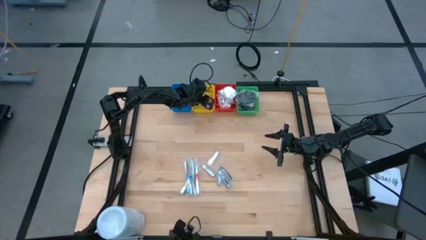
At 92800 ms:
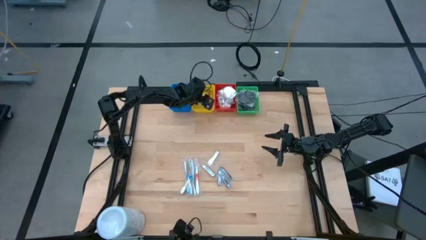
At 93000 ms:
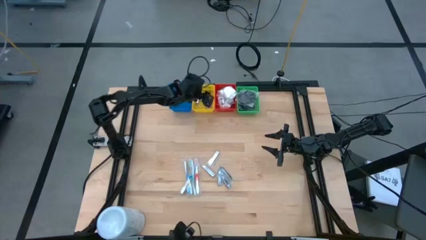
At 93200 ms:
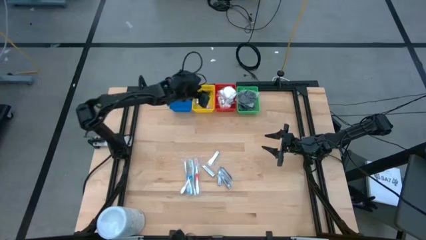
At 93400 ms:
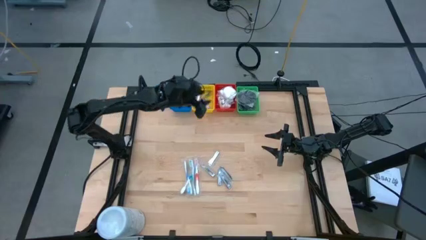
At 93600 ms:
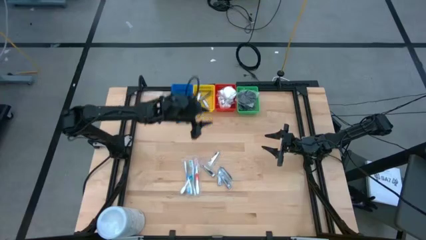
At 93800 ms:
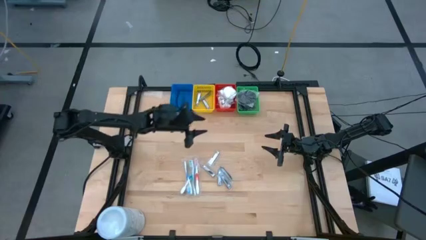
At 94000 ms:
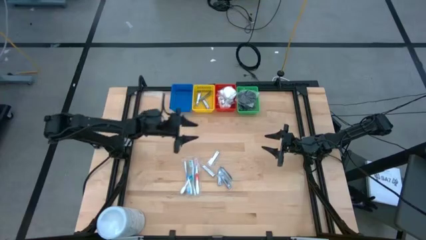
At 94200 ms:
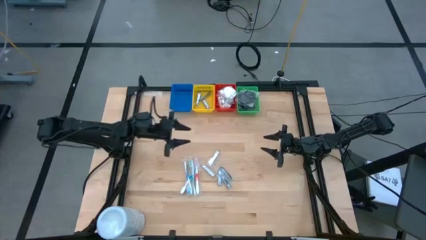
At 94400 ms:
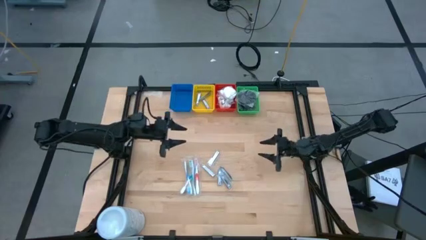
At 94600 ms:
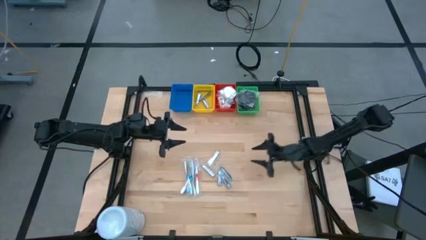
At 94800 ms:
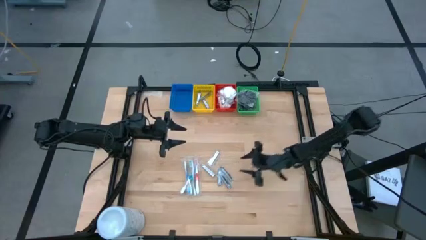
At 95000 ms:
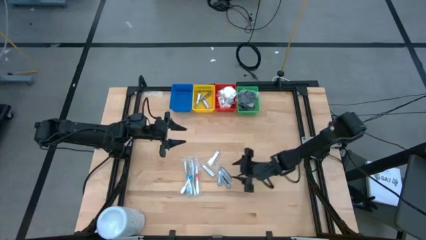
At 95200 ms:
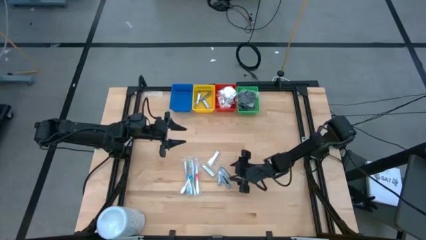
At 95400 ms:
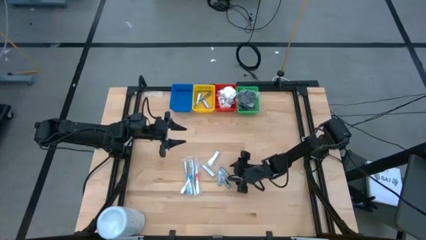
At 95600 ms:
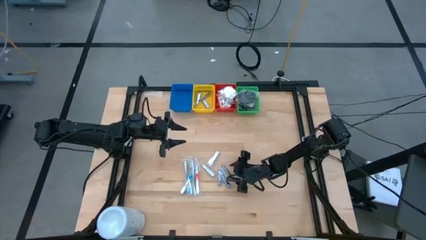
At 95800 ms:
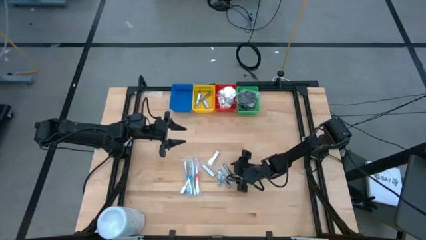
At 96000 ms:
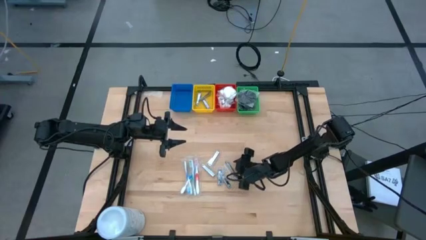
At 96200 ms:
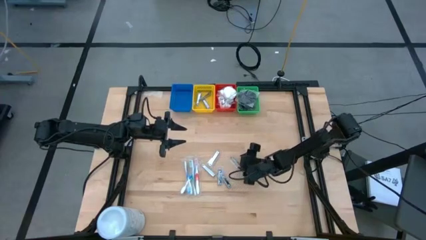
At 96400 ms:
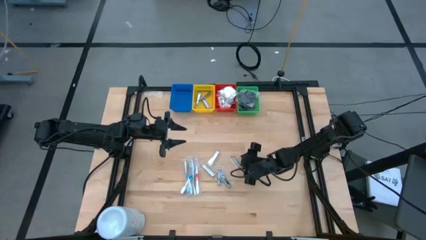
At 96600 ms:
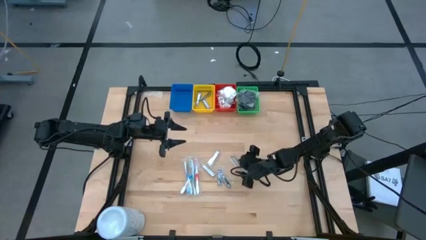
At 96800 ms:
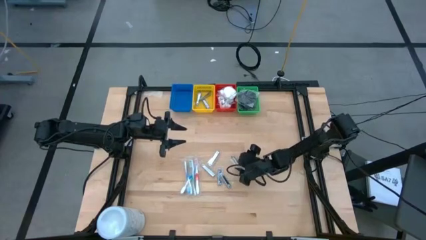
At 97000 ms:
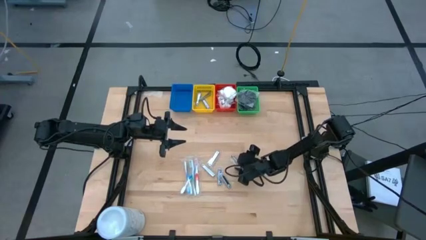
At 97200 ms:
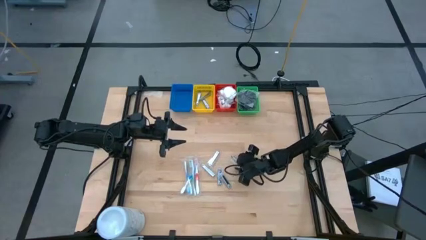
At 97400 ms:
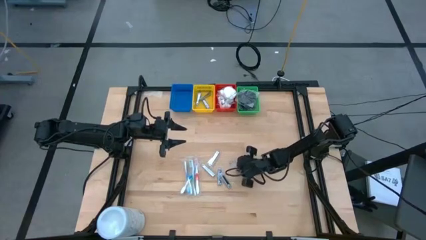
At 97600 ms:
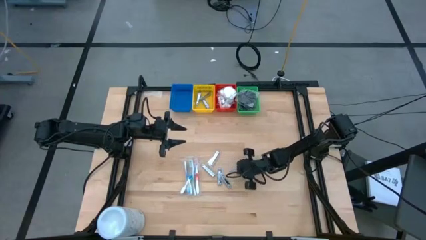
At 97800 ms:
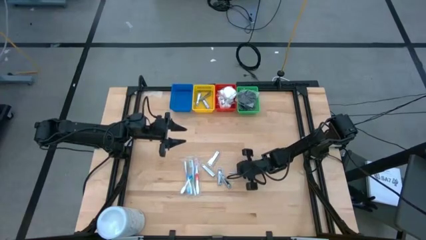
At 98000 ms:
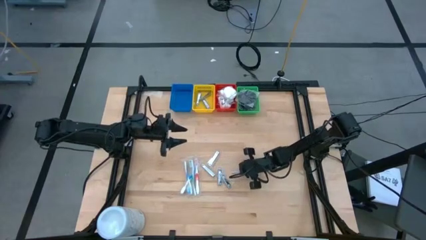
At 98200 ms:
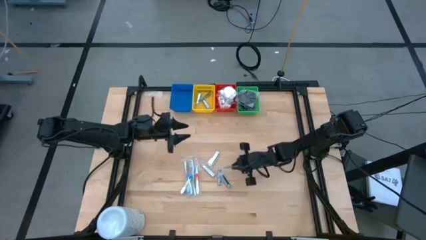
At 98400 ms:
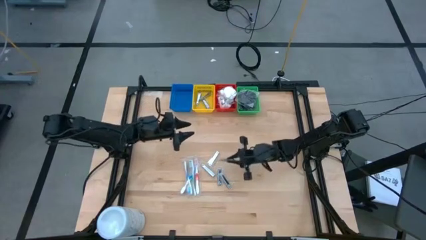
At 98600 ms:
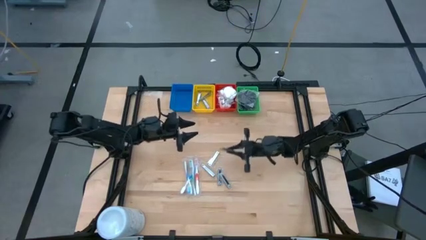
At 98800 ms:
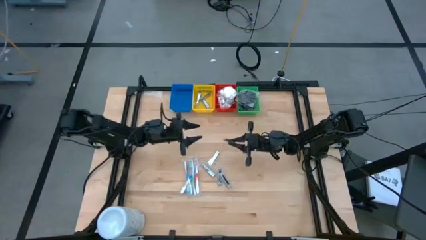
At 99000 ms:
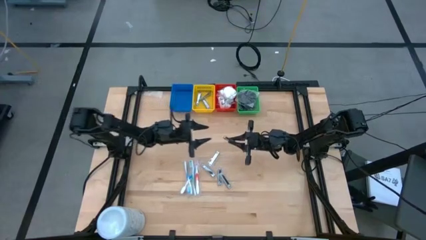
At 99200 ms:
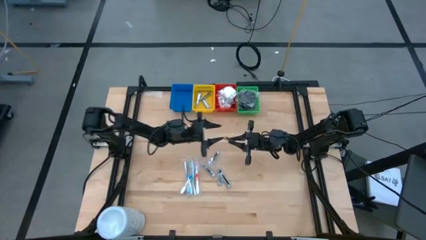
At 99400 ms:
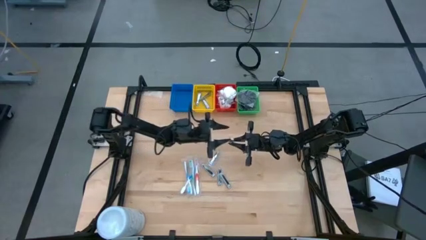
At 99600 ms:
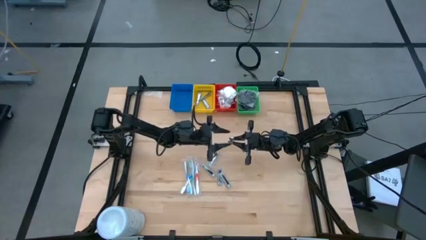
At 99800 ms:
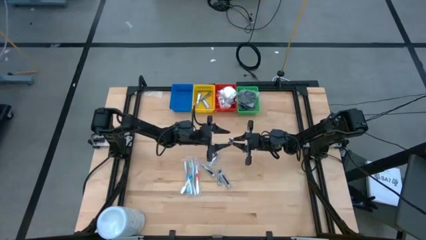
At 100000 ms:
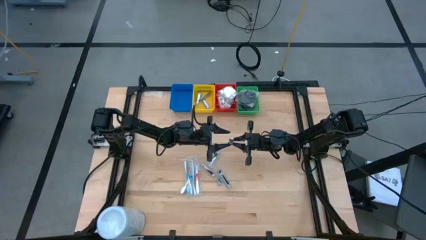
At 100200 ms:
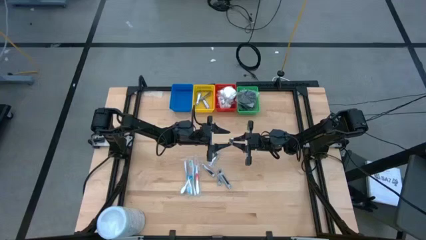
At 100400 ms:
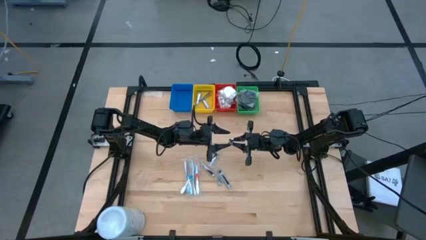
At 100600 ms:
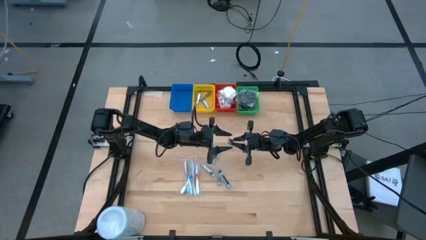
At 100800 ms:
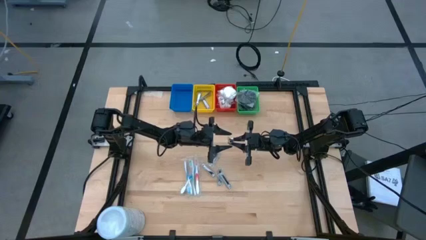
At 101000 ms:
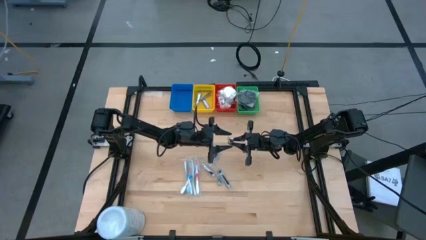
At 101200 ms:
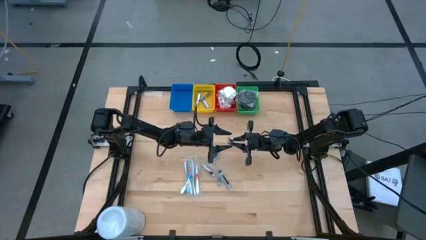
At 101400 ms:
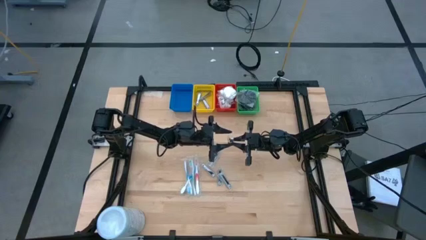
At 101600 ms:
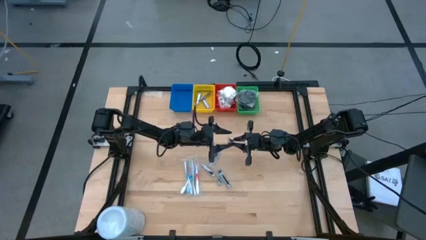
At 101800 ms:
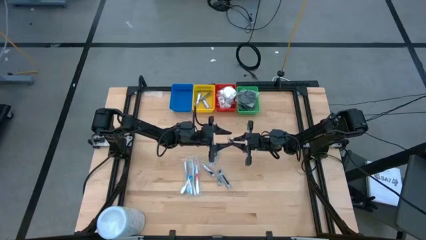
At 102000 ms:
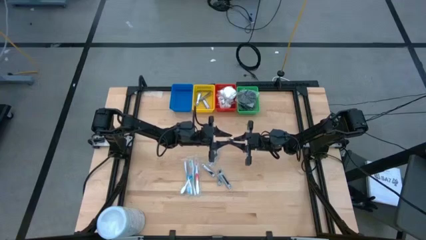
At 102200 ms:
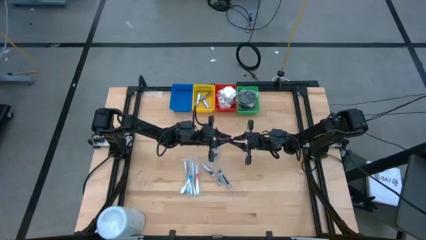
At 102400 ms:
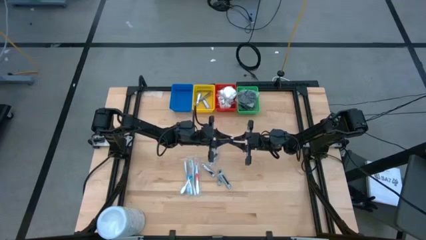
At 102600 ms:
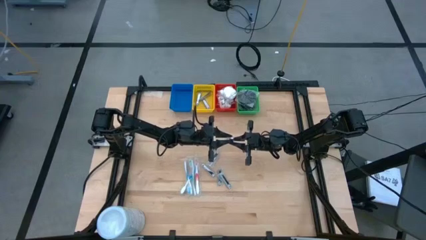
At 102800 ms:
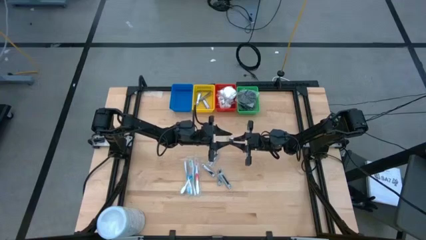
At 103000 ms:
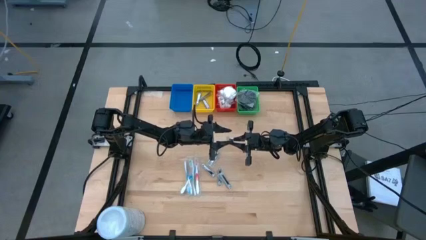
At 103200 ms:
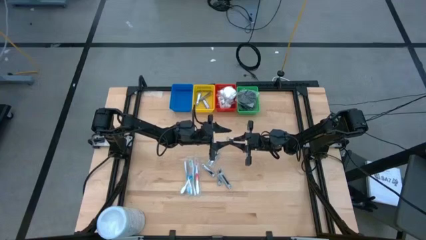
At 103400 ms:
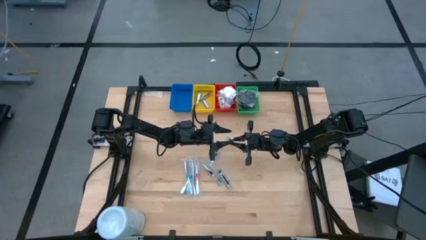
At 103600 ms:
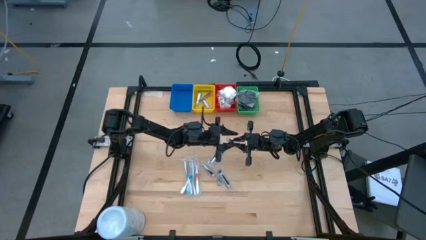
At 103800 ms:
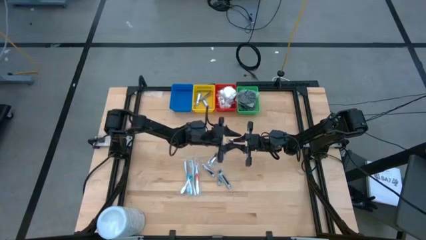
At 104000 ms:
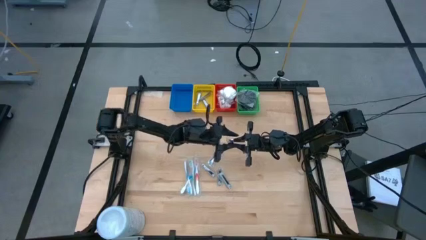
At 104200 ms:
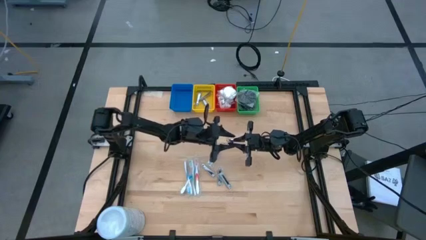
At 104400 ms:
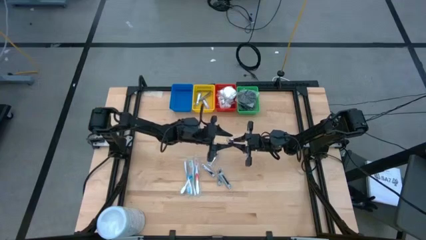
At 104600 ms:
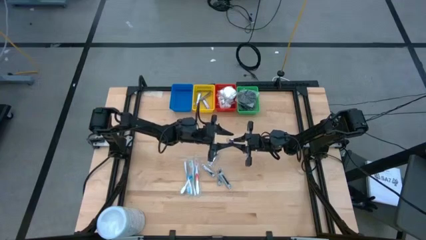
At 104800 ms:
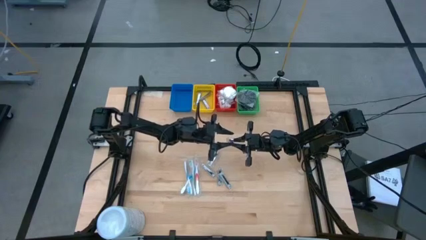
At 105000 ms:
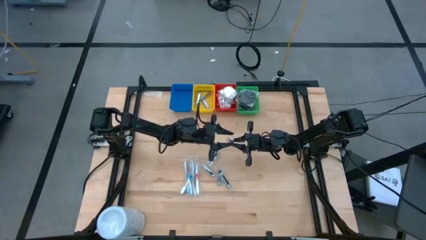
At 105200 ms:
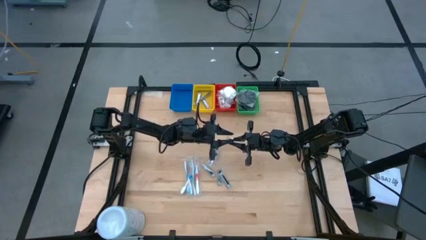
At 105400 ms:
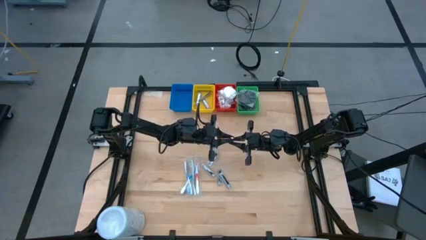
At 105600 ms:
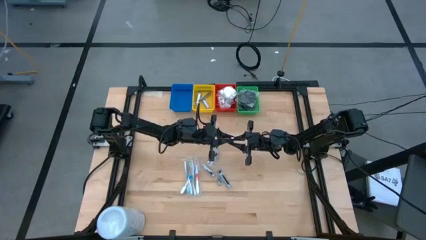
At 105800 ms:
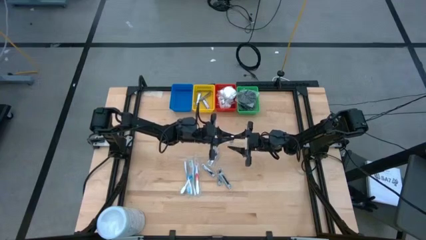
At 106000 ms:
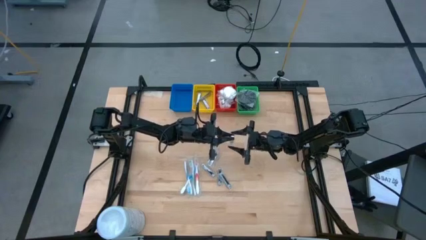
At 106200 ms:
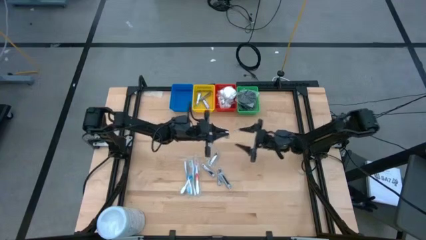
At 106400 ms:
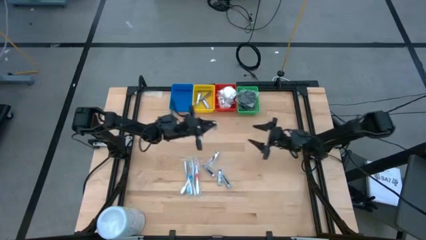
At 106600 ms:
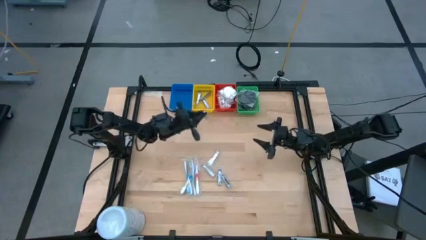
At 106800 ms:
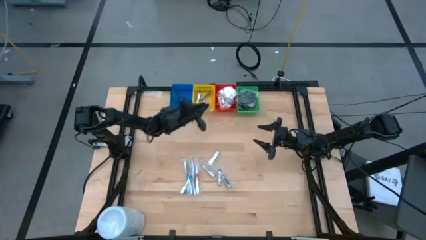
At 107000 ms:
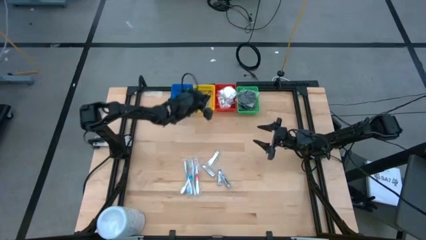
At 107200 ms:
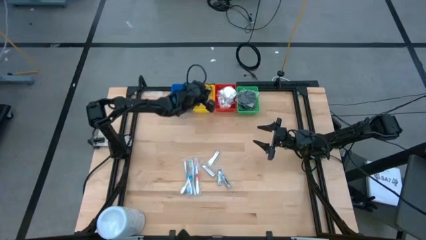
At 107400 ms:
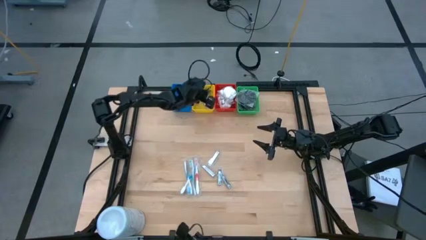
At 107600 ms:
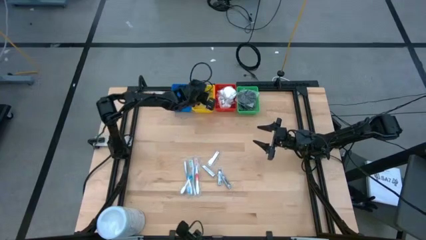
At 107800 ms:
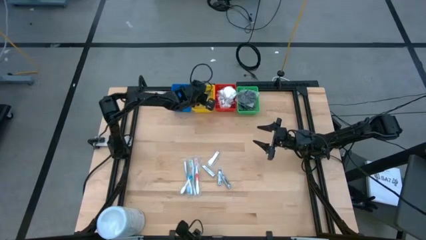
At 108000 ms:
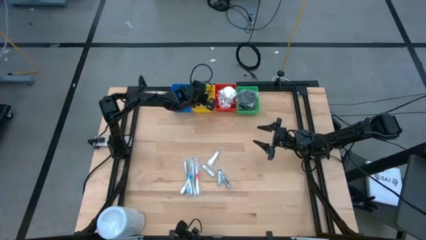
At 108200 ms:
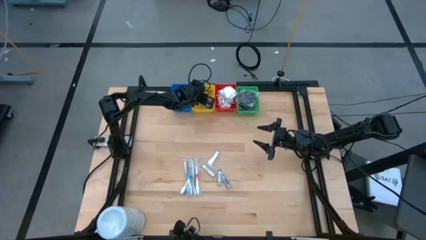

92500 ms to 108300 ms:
Task: Pick & Place Travel size toiletries
Put the nail cutter into the yellow bin
